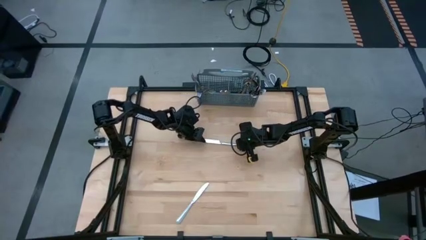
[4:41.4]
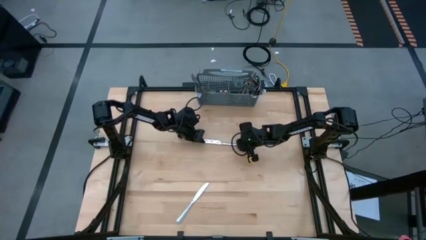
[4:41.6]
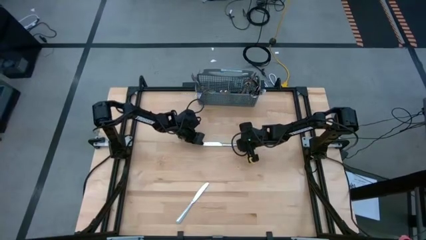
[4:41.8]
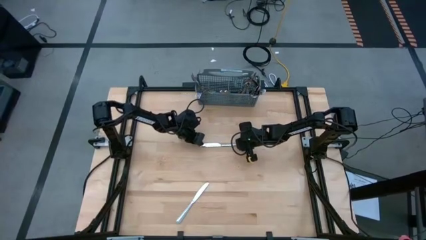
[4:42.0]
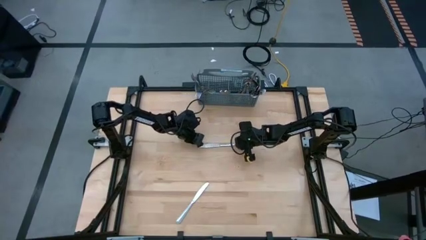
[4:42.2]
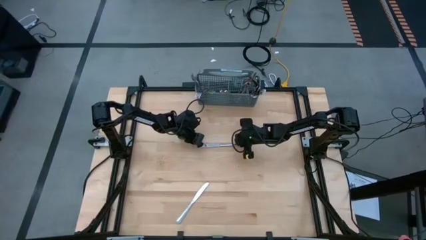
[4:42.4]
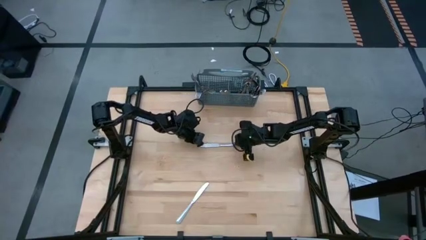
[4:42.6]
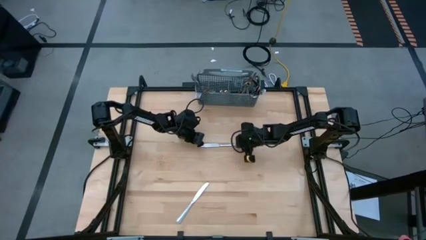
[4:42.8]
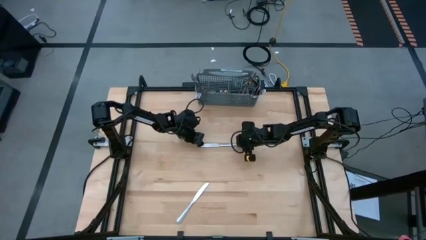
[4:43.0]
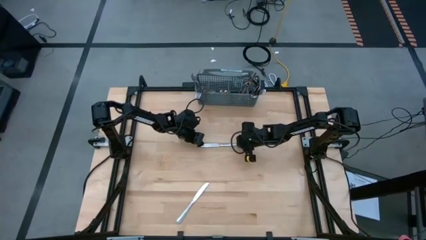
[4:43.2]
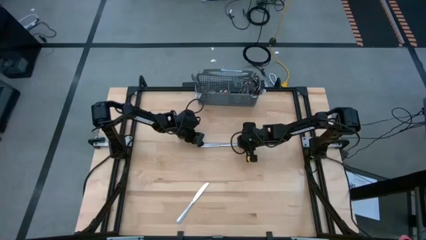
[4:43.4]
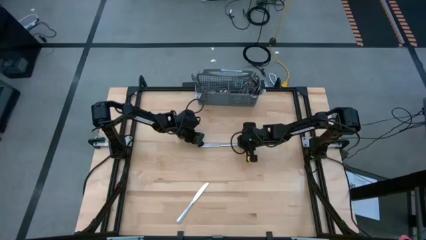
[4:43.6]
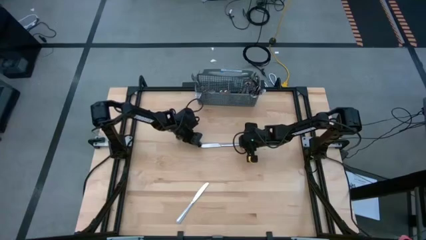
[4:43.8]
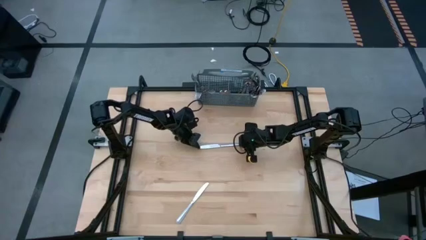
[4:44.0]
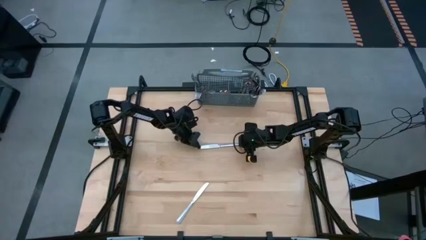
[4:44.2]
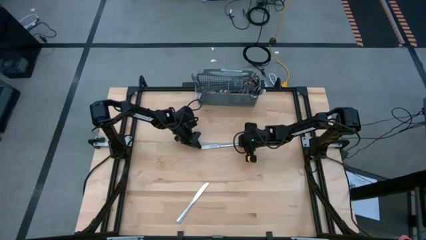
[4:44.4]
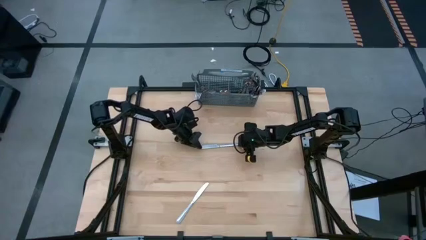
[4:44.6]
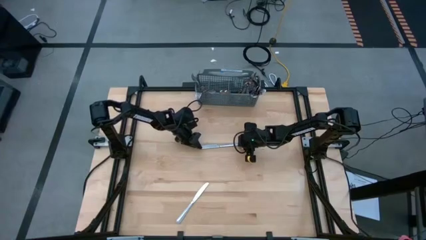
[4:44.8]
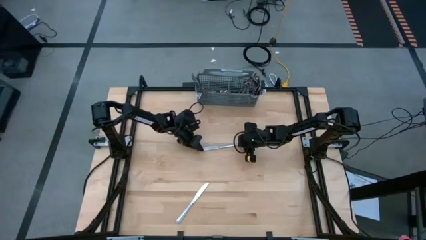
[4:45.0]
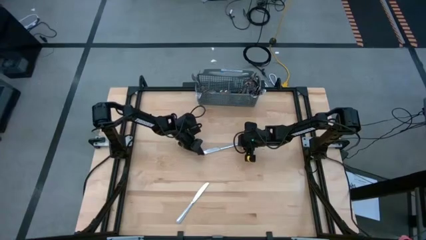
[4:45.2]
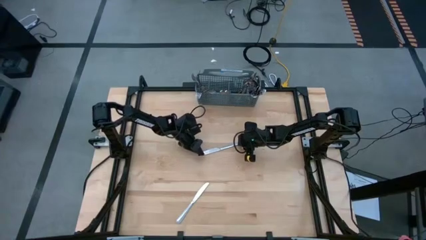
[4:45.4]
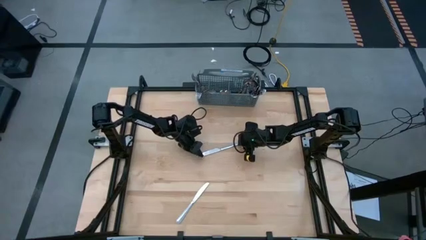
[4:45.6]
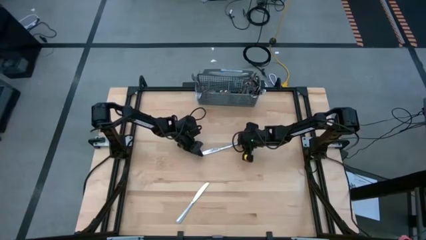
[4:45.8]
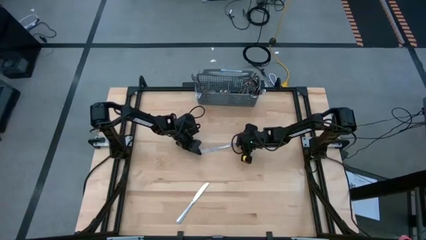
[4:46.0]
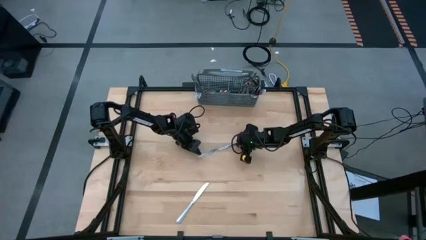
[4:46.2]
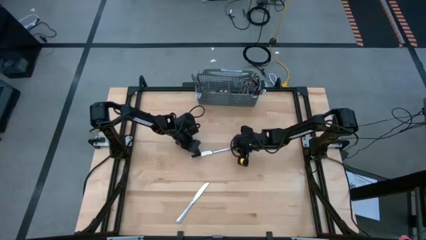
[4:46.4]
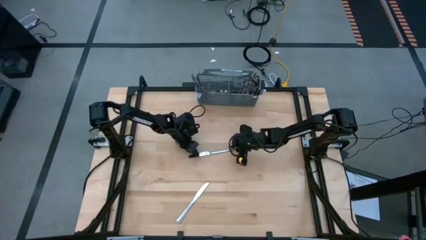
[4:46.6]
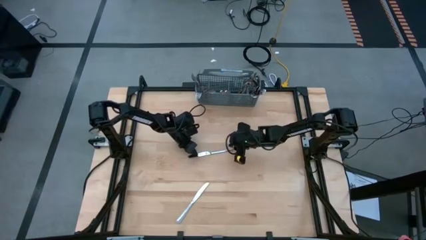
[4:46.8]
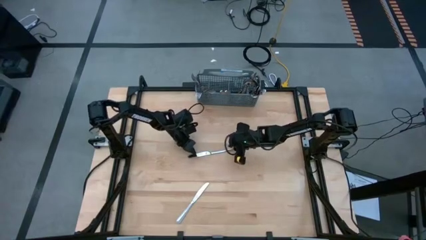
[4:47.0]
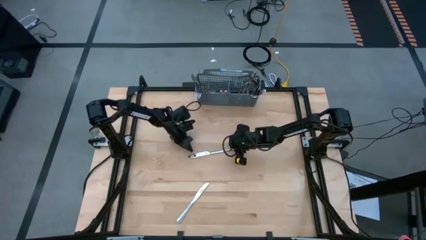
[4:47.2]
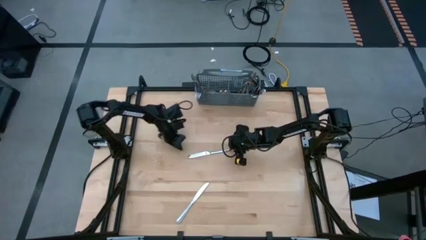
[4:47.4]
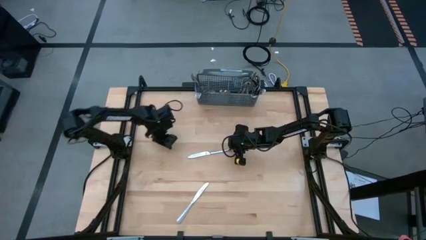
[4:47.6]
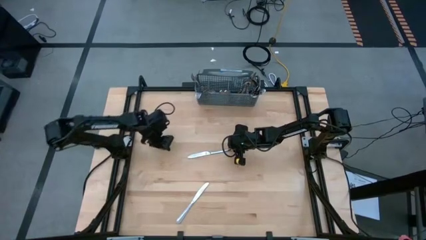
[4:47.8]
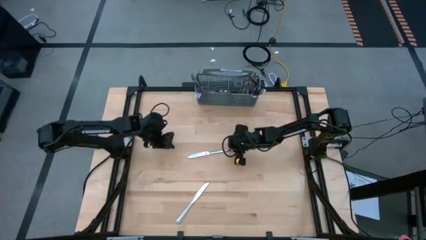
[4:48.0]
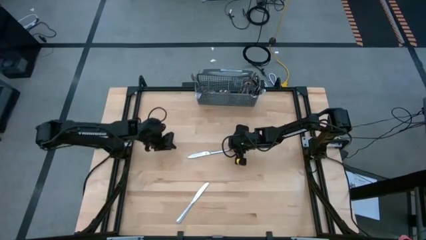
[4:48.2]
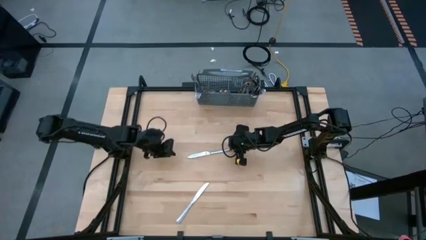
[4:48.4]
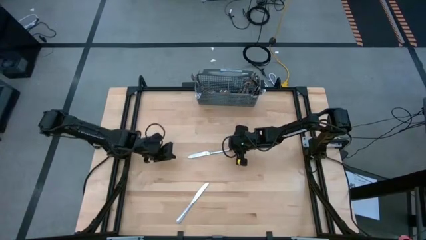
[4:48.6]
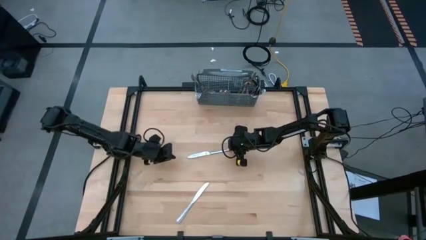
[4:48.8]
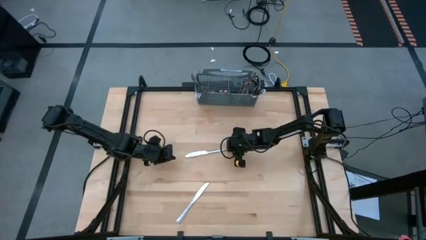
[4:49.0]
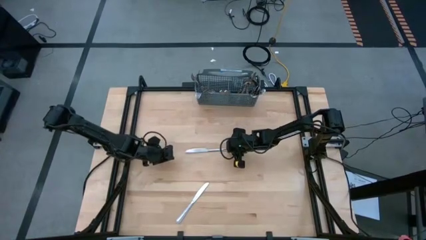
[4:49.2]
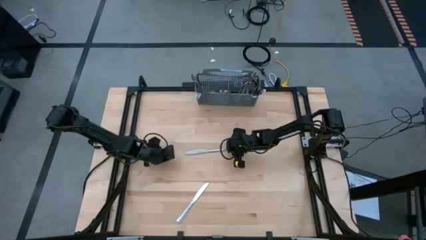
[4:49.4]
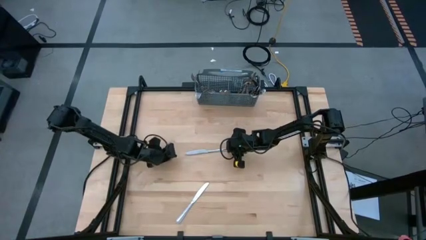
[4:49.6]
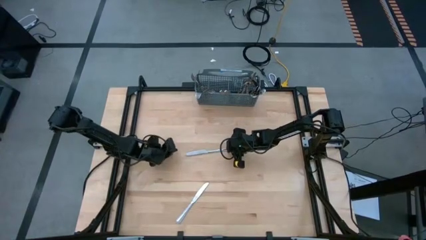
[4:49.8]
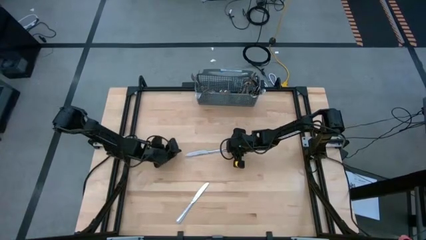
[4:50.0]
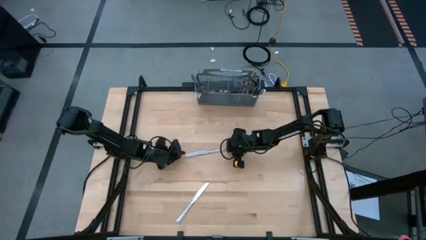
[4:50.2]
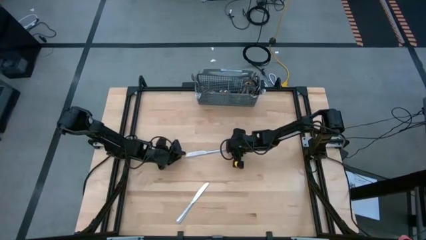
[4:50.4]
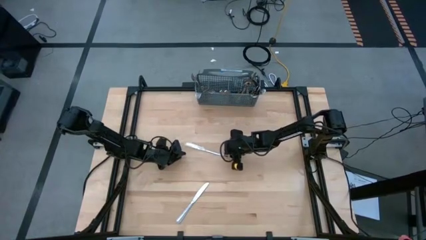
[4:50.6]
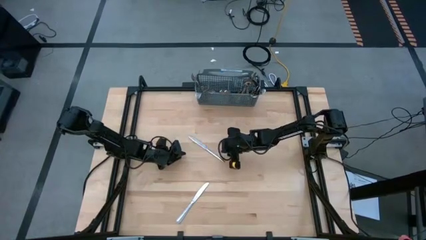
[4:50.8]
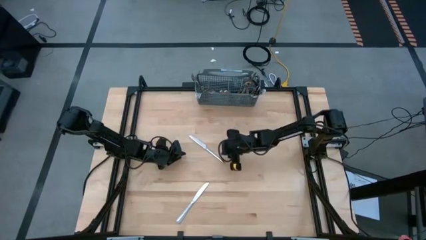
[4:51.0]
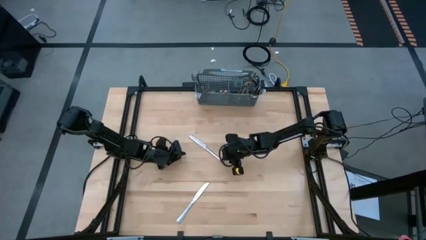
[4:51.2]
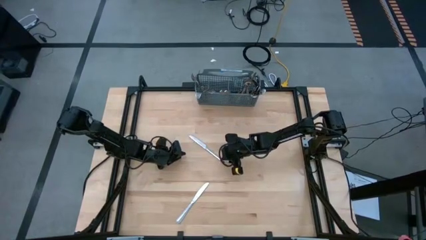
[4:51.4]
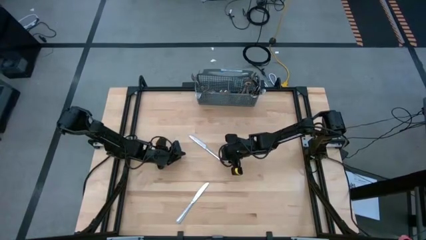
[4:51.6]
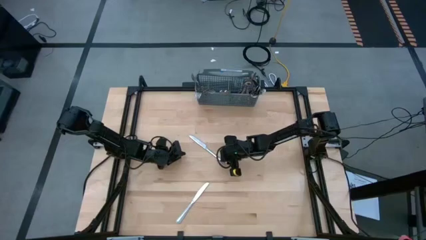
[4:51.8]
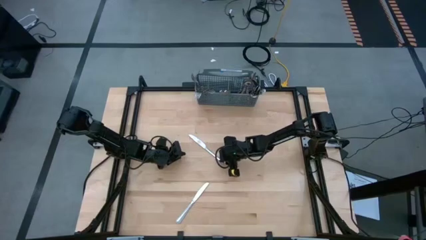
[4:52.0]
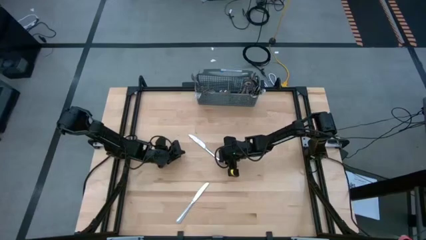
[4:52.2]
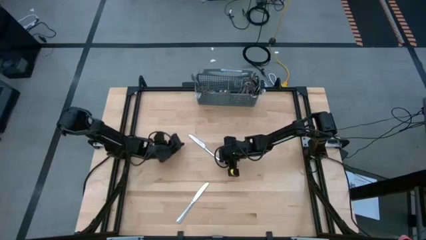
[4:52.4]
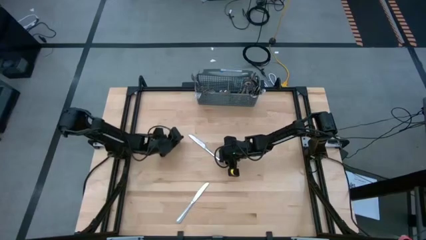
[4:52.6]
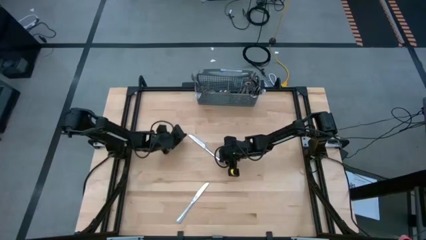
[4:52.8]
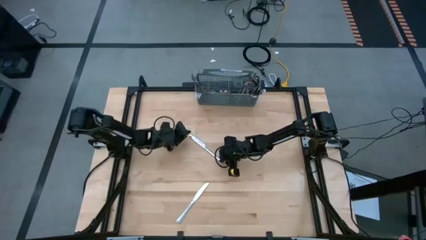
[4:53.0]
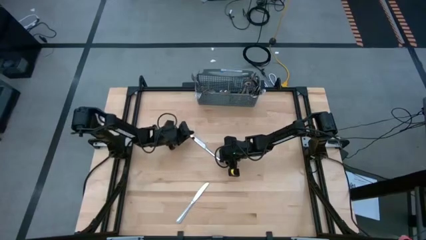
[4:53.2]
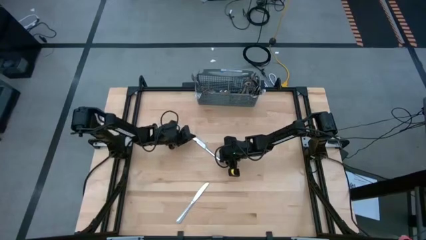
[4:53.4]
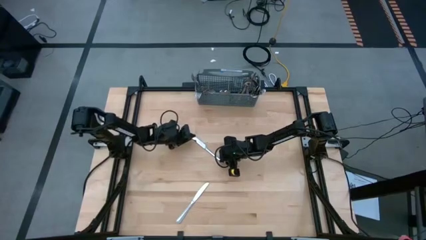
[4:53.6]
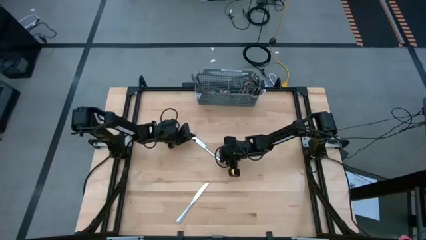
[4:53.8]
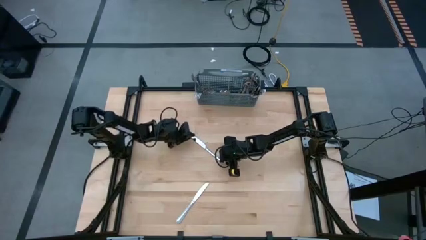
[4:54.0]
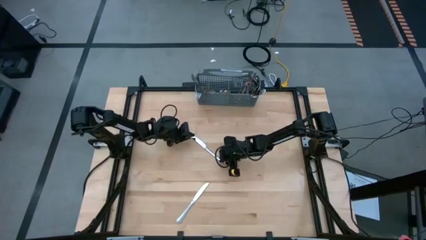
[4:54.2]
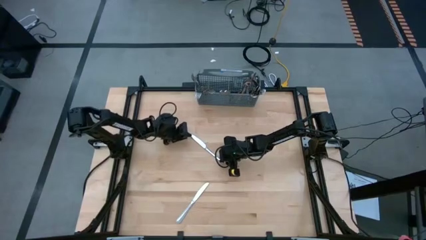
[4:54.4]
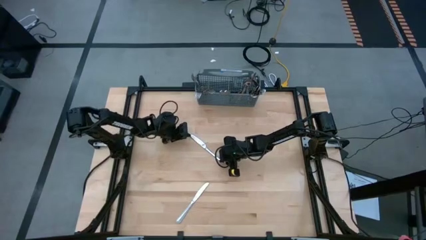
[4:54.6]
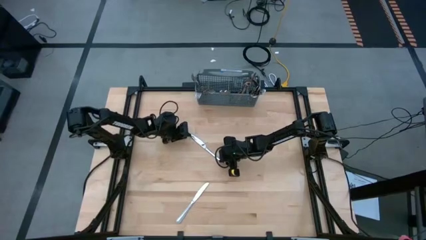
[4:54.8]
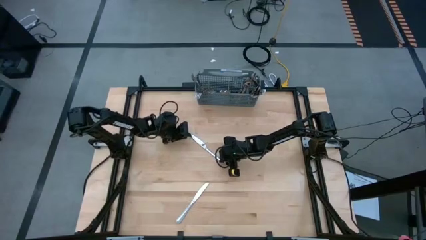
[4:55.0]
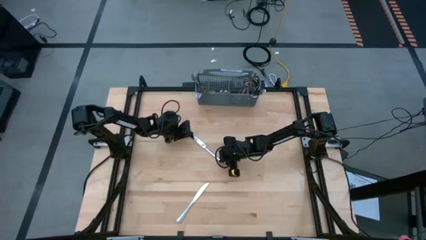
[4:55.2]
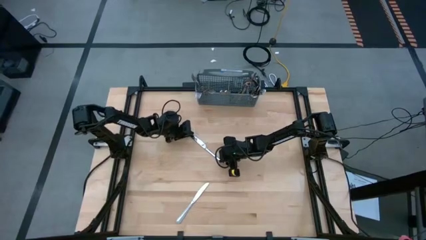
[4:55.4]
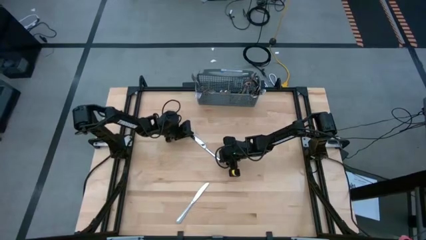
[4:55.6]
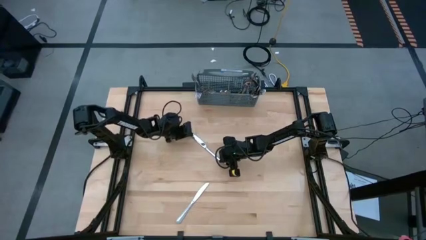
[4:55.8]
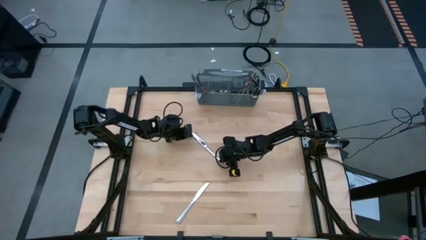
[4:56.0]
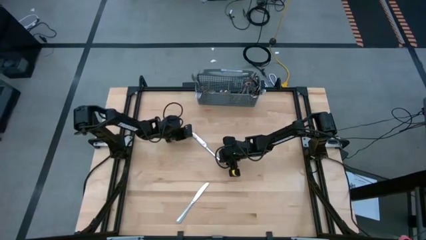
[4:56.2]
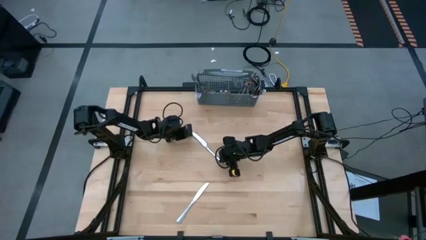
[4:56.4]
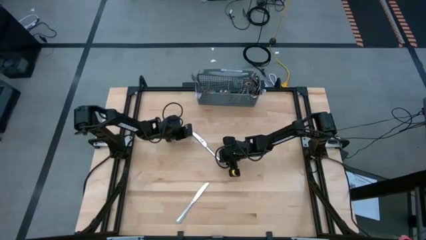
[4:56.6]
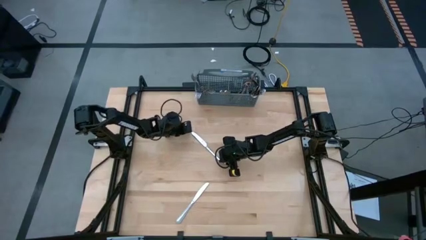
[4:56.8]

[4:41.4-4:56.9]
Task: Sort silverware
Put the silver table knife into the silverware organizer

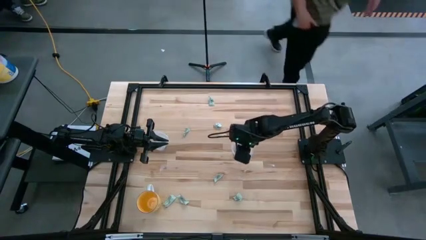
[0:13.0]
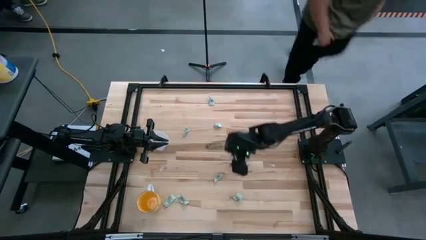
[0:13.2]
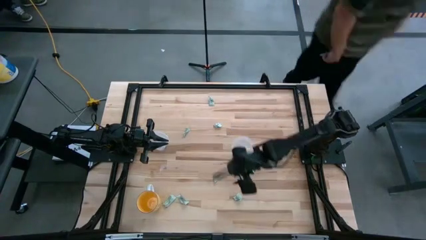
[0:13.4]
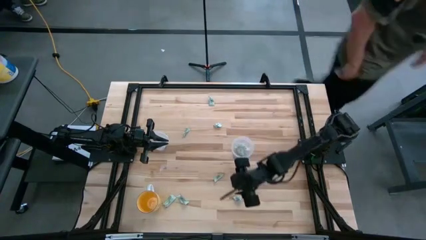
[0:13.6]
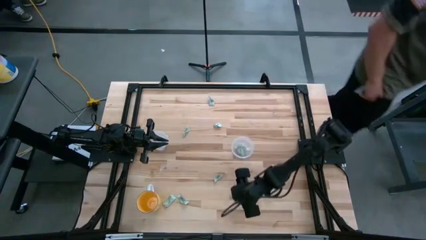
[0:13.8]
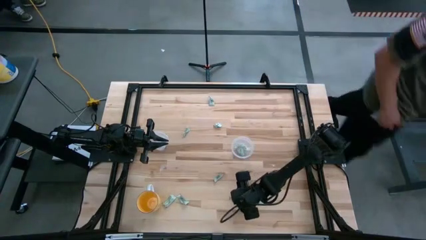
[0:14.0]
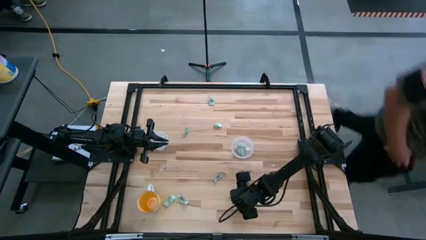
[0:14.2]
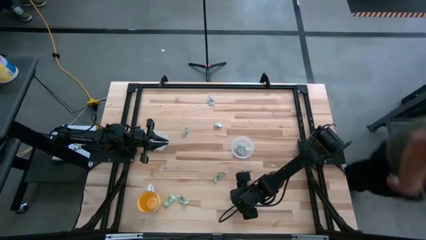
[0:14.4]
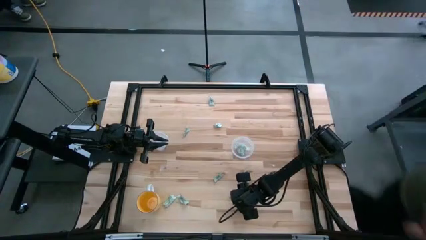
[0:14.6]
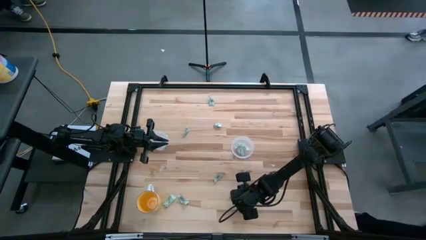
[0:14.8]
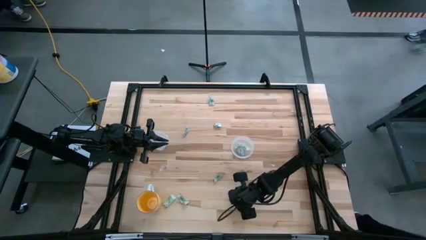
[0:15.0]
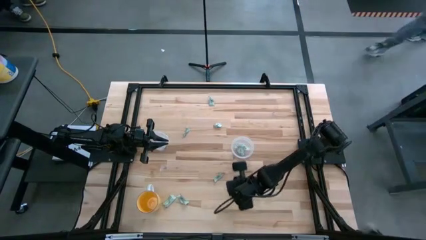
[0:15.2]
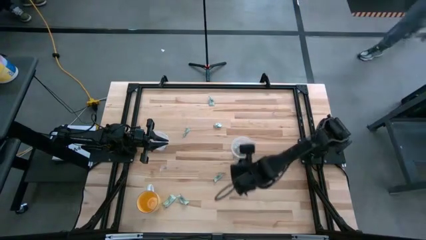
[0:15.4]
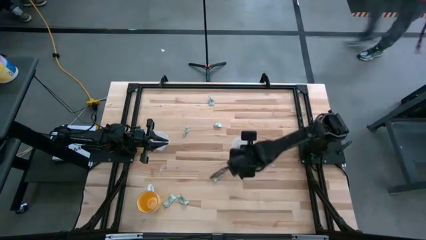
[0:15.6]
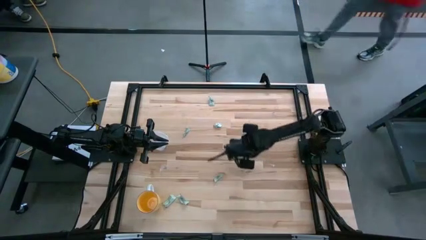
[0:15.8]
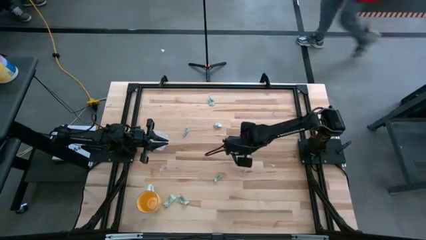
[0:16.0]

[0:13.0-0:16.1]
Task: Pick and place items into bin
Put the stevia pack into the right transparent bin
